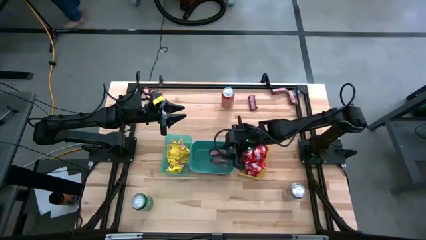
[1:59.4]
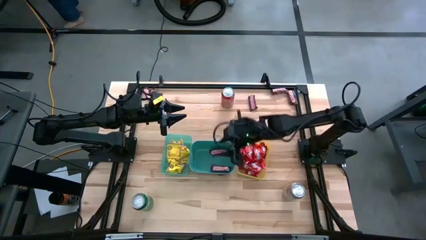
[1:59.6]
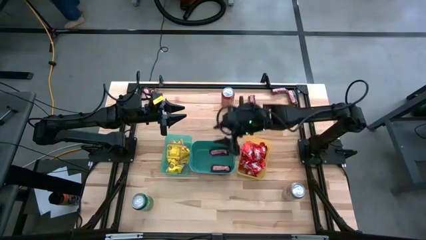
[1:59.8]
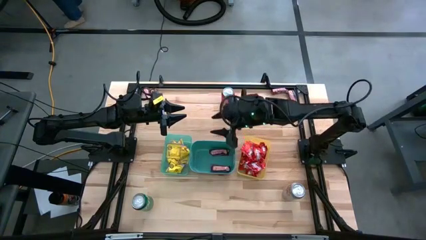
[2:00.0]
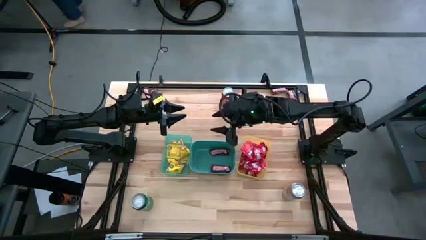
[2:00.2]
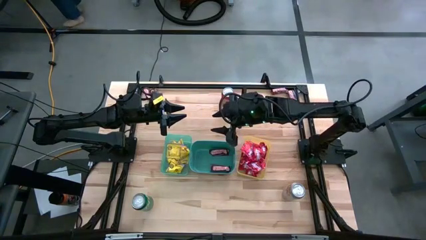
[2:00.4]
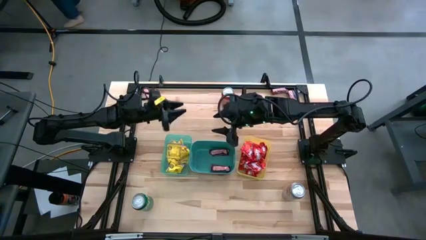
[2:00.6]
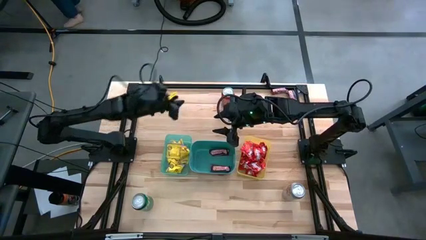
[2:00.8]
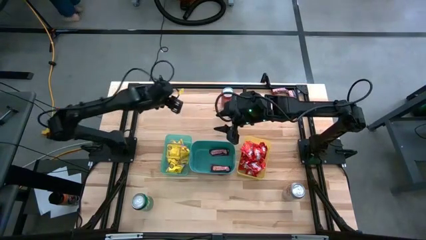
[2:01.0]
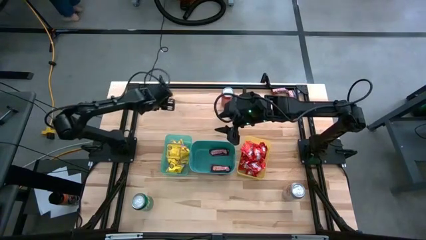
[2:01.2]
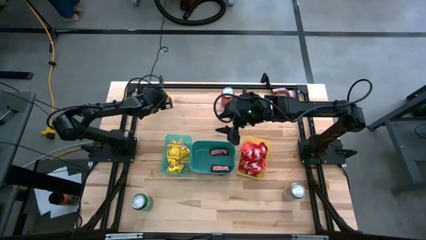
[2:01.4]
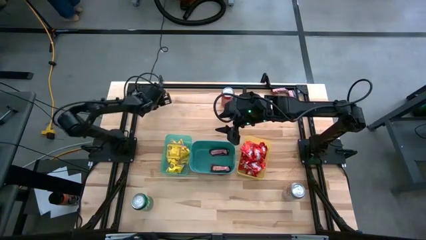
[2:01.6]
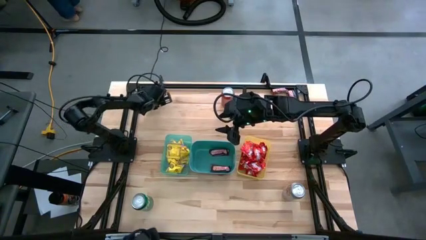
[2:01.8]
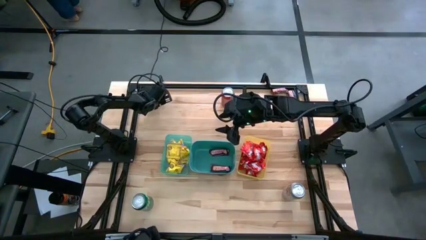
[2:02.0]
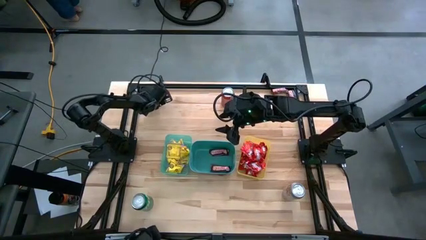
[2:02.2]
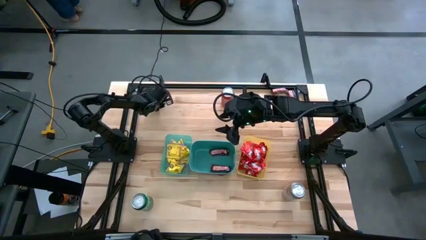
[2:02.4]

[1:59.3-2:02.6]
Task: Sort candy
Put the brown chocolate into the green bin

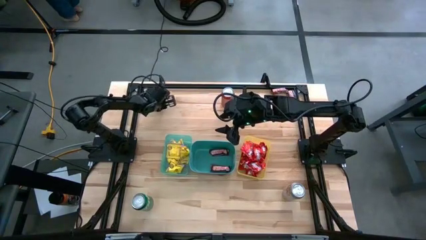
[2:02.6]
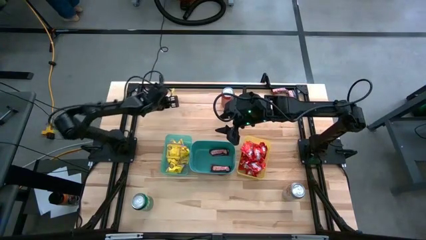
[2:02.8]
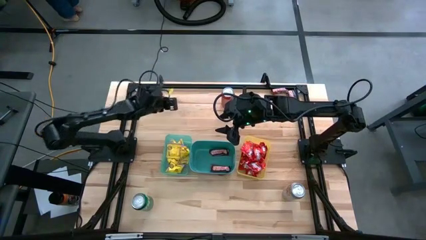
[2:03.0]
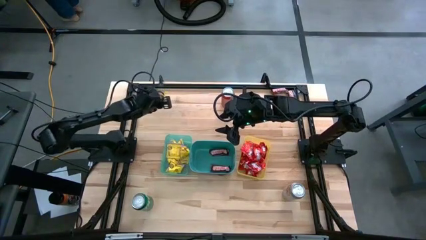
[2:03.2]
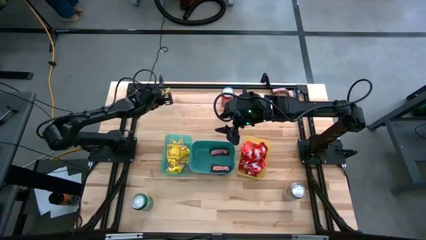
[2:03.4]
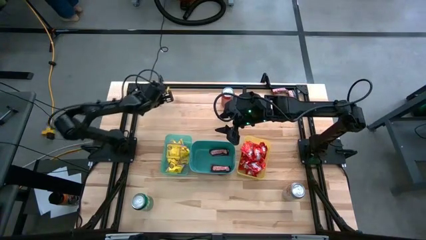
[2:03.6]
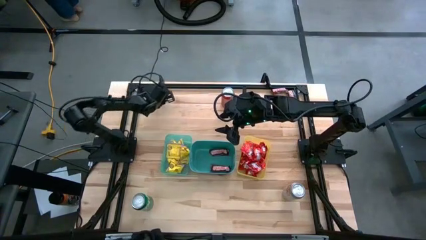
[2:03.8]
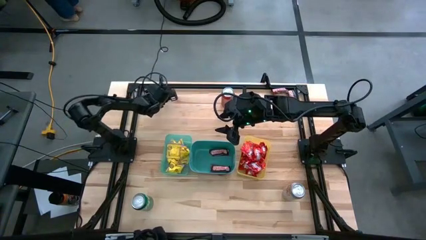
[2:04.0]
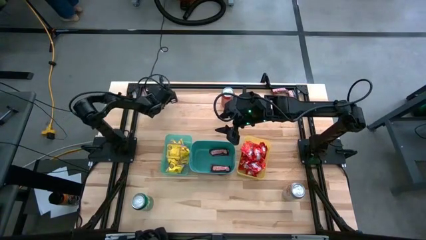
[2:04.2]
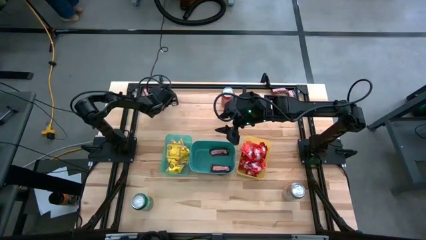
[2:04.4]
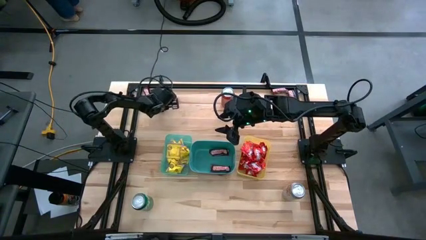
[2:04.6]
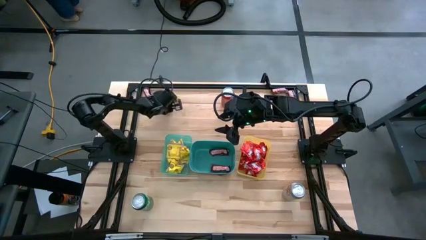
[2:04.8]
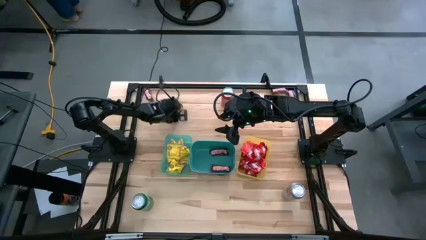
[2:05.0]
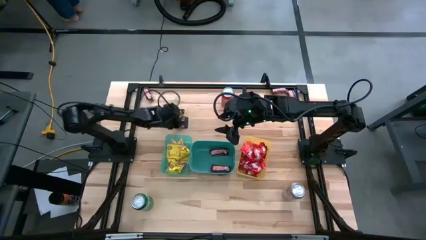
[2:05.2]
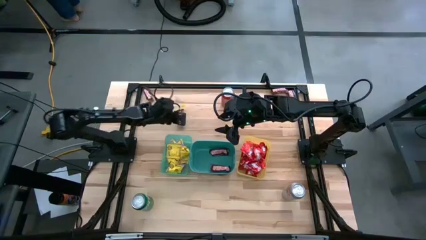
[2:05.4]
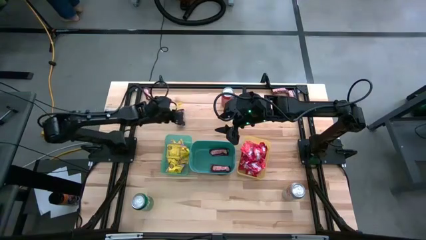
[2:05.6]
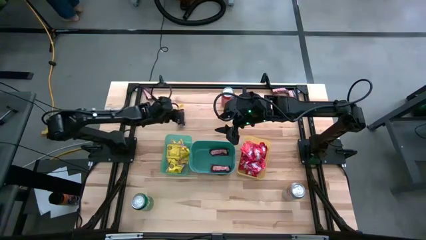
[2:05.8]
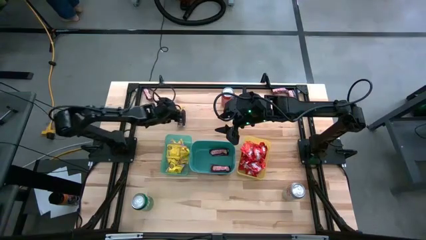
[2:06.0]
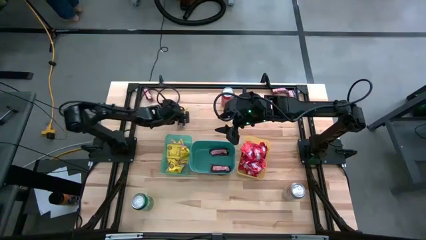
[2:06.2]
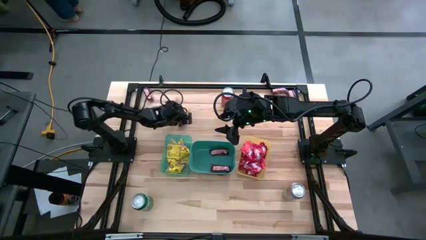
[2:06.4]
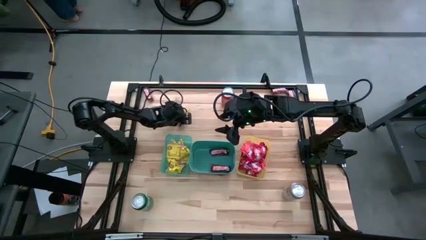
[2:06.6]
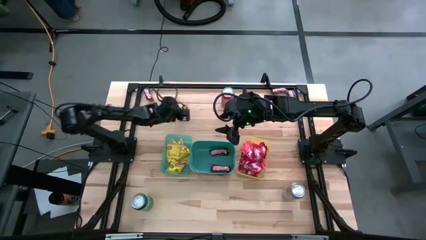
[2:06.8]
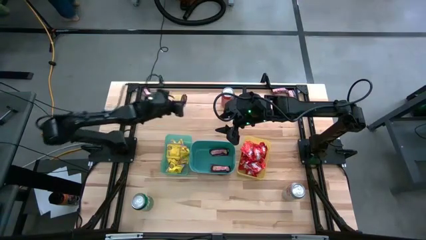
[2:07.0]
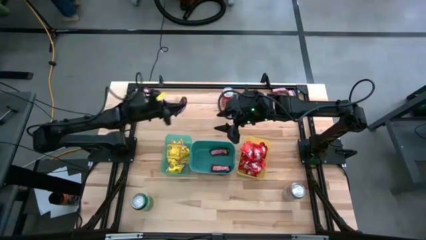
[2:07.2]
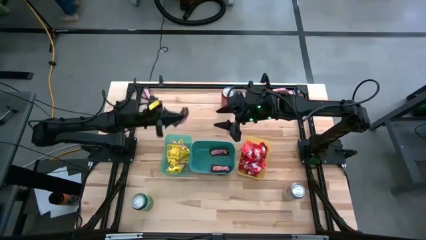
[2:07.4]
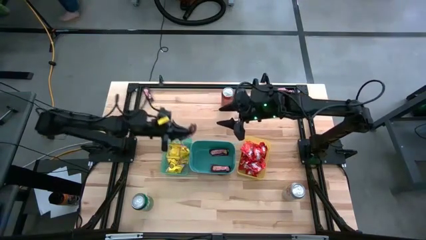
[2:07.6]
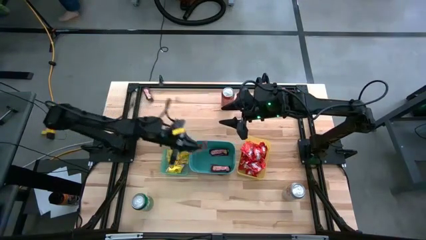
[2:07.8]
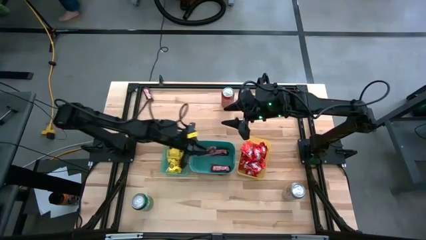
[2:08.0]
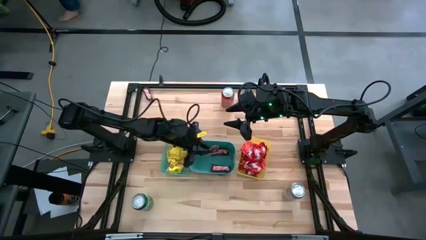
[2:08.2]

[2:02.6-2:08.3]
Put the brown chocolate into the green bin

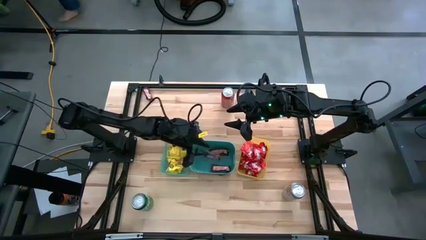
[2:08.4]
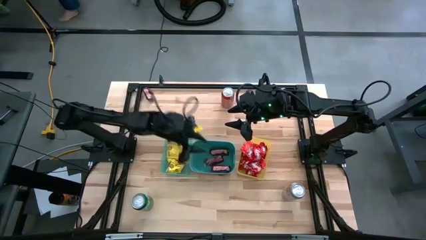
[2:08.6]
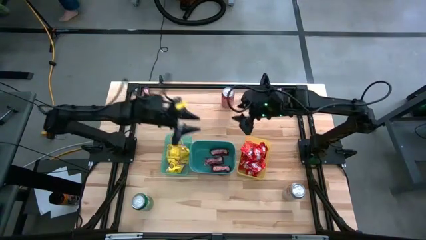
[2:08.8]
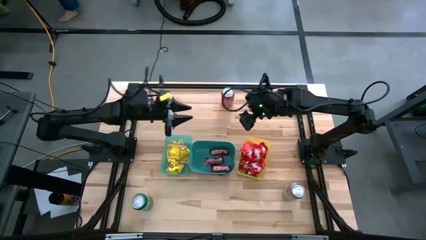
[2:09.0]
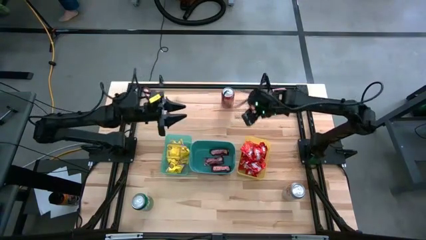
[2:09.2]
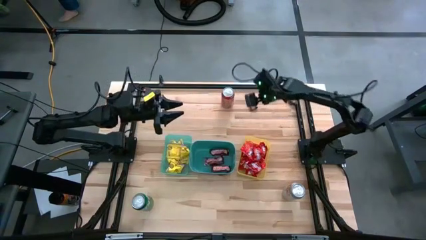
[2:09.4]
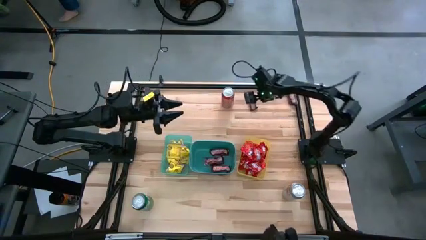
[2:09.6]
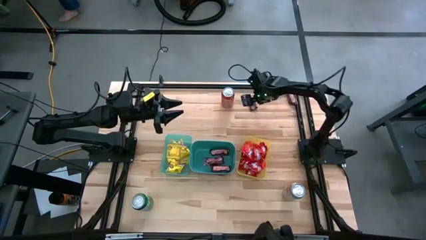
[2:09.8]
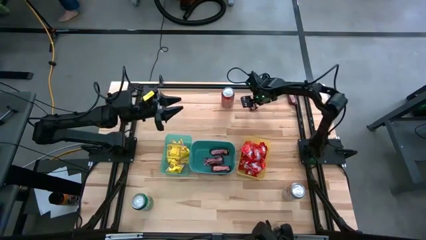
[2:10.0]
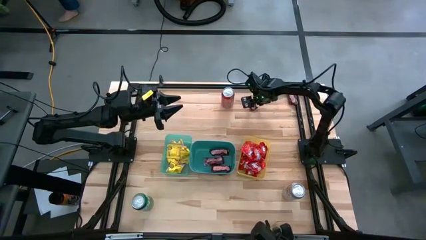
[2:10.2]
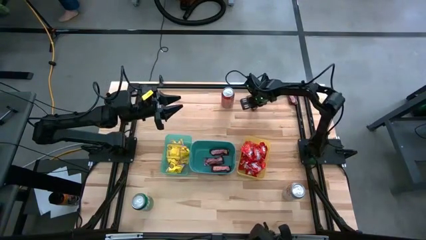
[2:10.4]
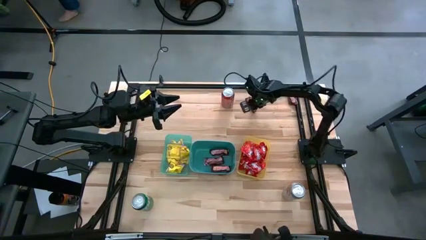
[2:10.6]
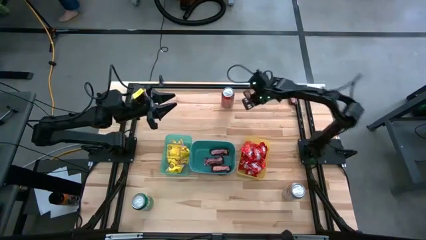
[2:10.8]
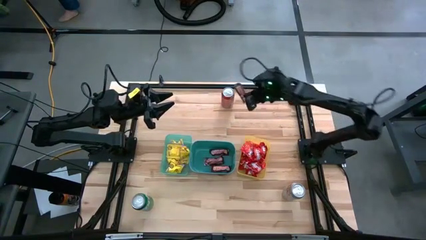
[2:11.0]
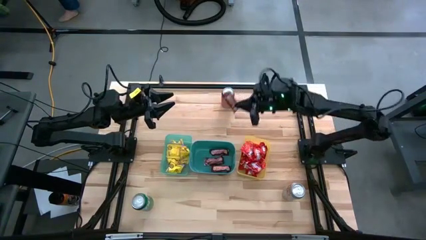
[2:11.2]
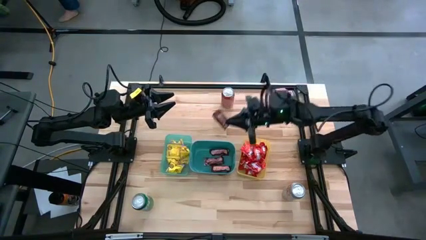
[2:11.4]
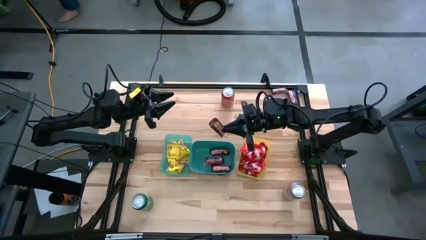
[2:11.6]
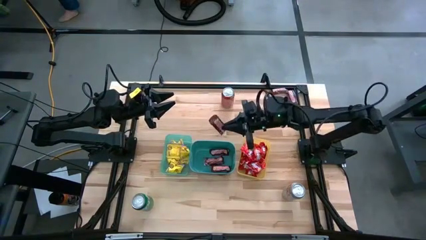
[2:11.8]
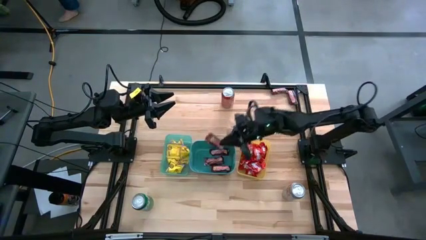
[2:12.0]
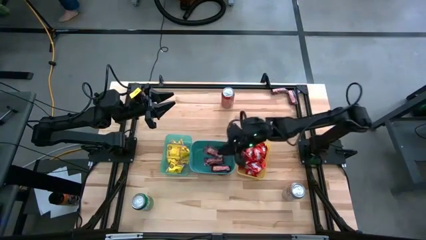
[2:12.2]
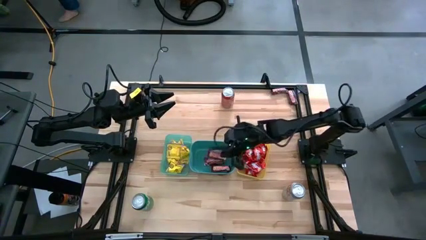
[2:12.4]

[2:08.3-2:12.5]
Put the brown chocolate into the green bin

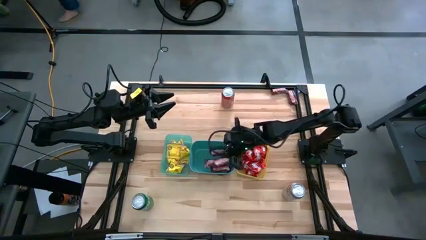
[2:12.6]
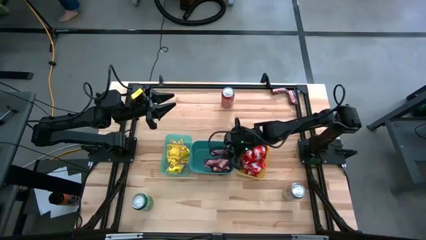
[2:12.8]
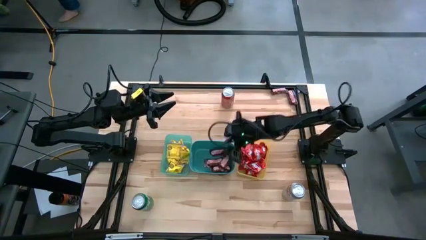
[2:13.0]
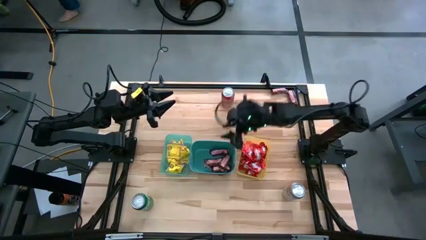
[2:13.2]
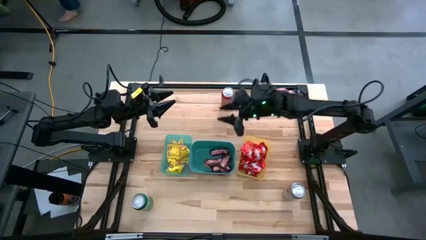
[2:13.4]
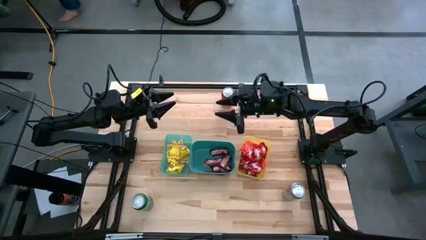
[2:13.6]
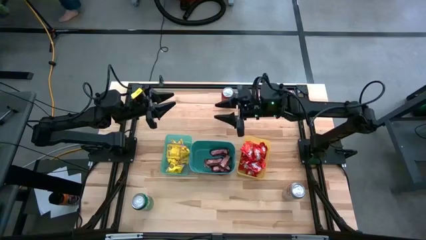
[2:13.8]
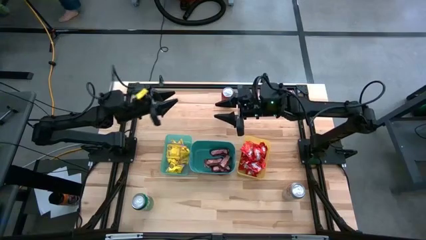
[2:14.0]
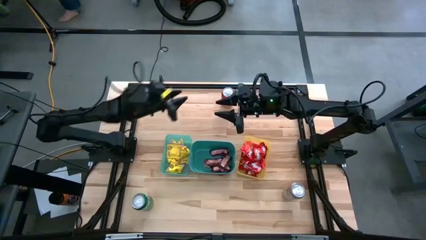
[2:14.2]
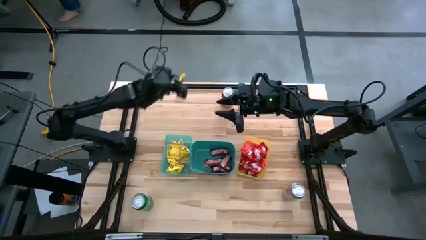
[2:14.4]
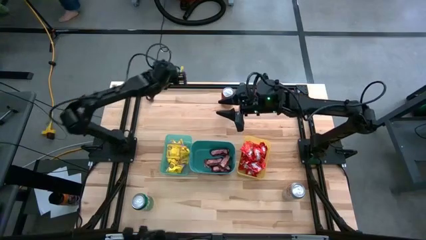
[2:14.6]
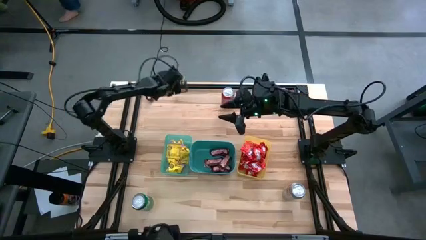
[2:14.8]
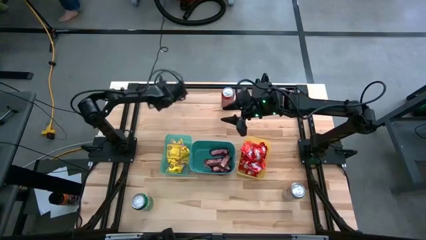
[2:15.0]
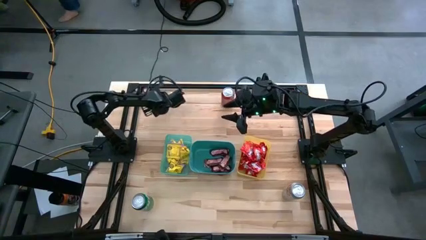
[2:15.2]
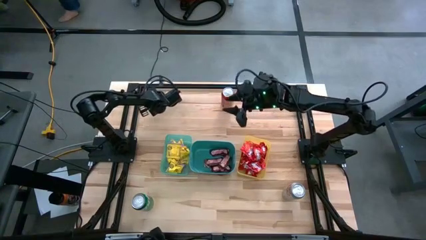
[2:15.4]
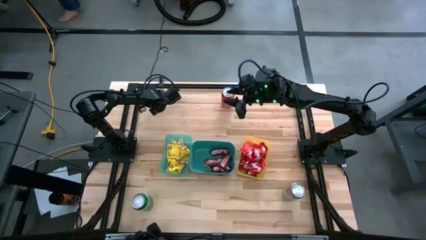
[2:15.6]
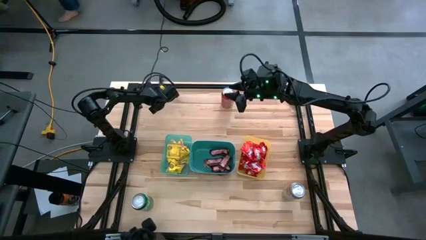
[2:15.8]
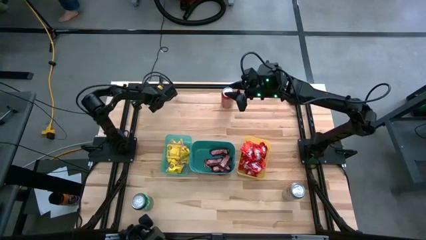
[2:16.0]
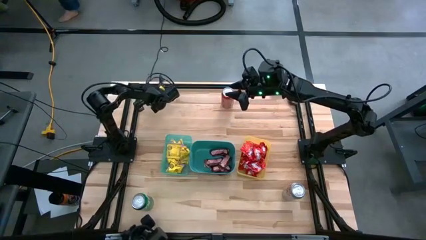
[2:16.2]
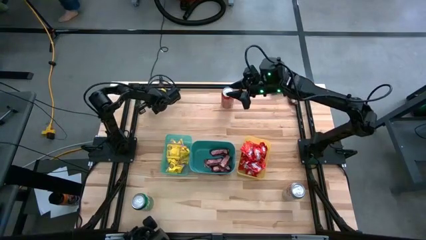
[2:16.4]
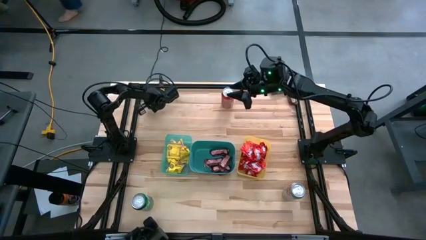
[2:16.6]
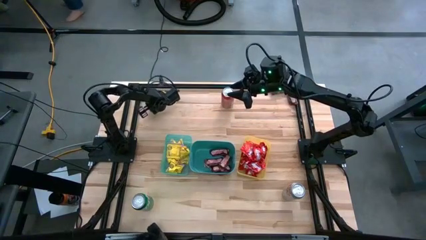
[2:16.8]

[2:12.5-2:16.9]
Put the brown chocolate into the green bin
